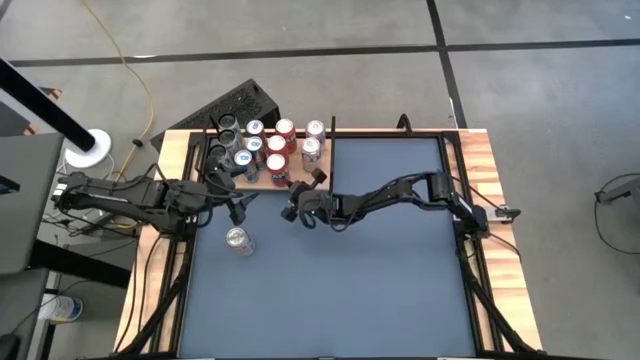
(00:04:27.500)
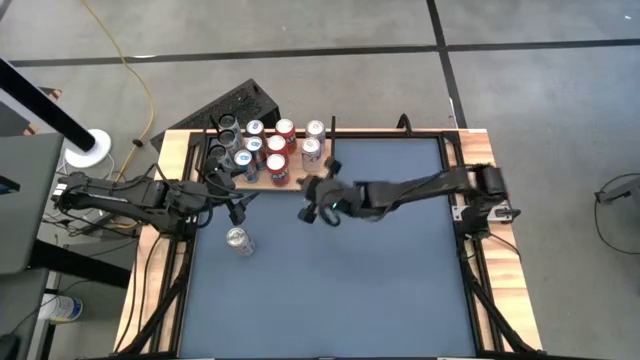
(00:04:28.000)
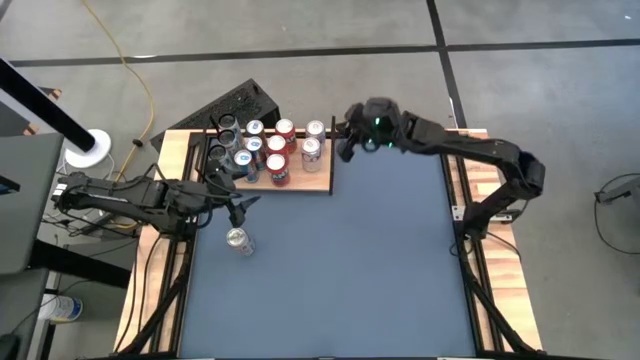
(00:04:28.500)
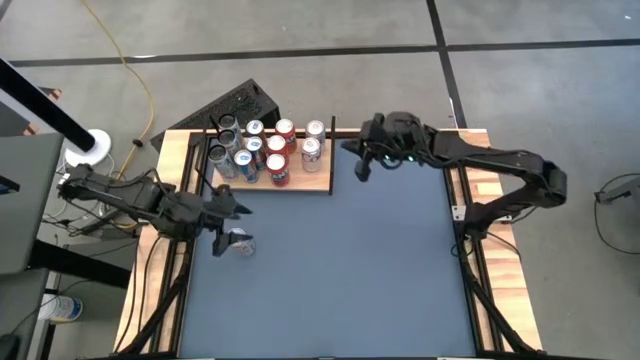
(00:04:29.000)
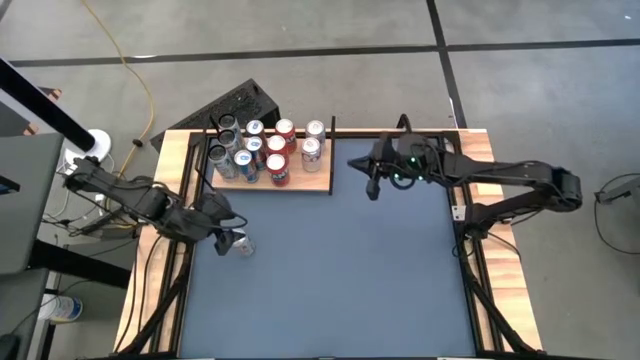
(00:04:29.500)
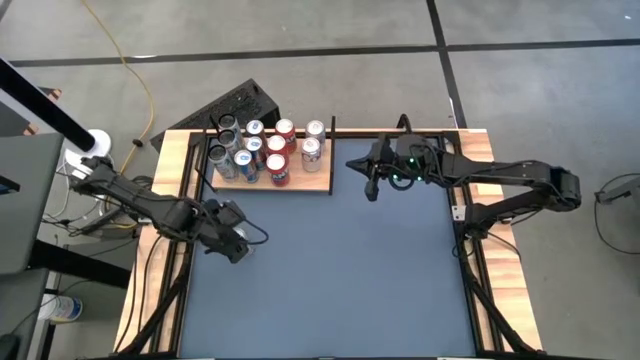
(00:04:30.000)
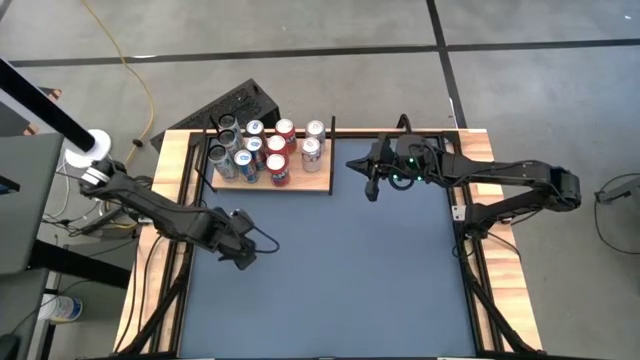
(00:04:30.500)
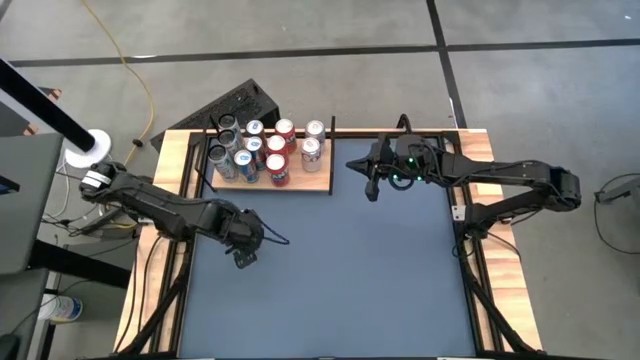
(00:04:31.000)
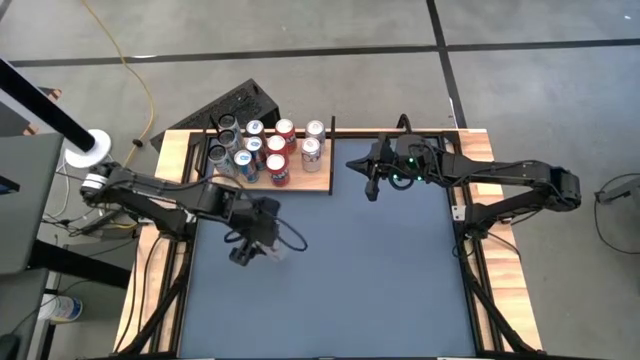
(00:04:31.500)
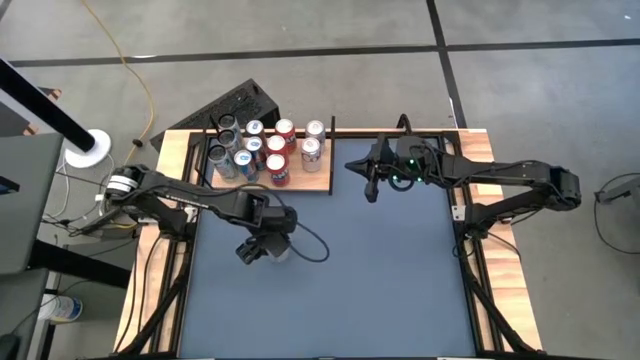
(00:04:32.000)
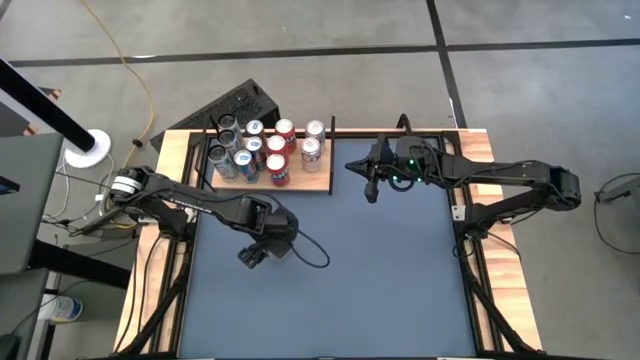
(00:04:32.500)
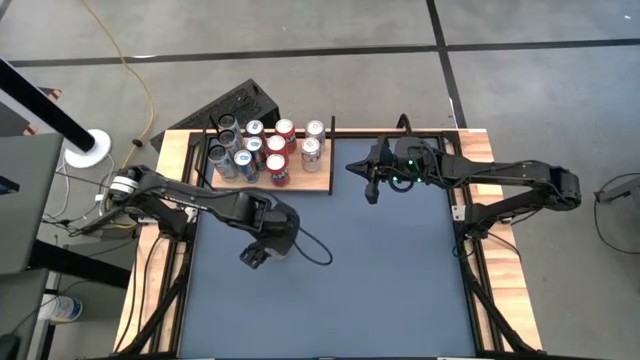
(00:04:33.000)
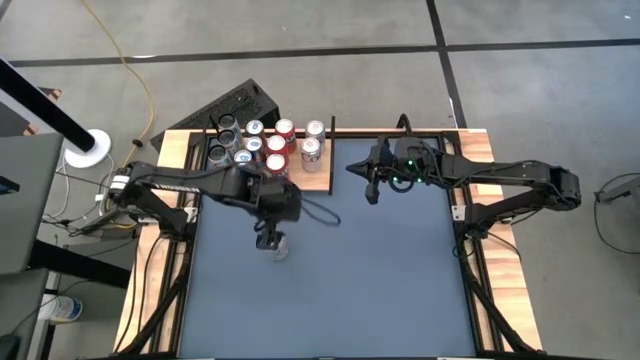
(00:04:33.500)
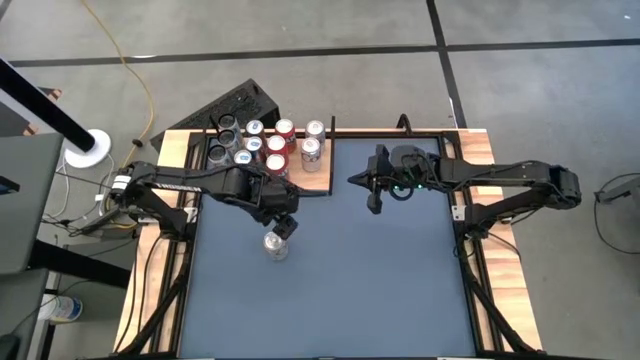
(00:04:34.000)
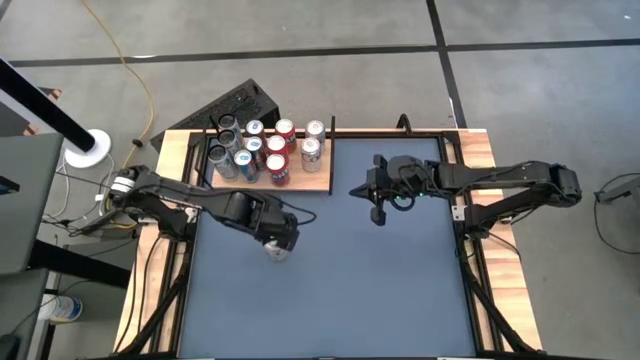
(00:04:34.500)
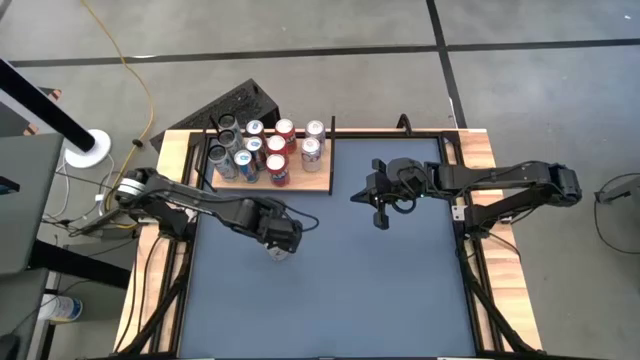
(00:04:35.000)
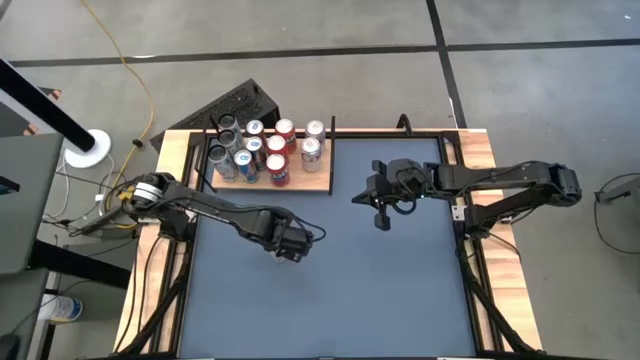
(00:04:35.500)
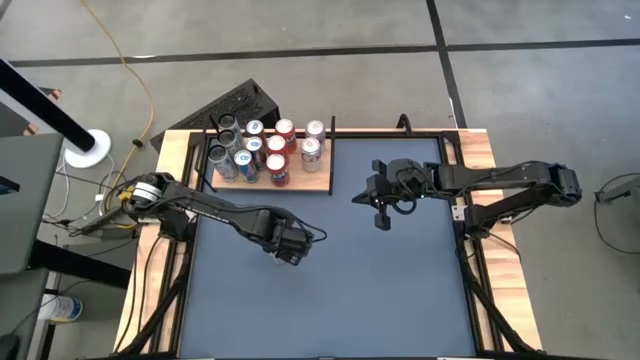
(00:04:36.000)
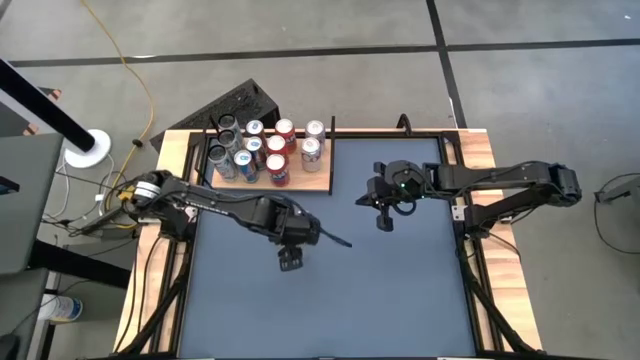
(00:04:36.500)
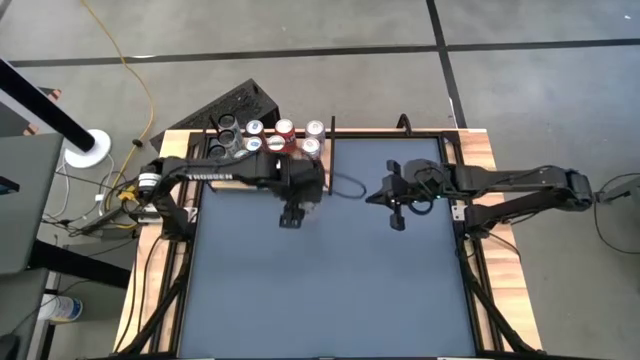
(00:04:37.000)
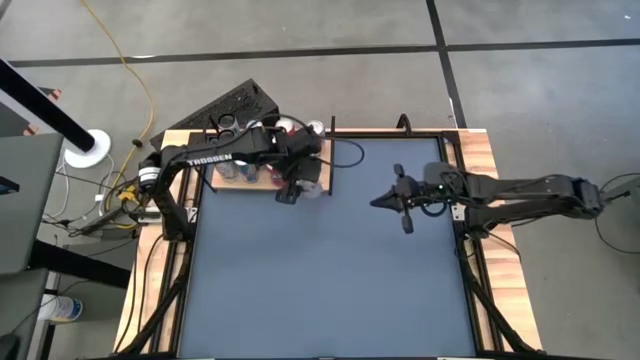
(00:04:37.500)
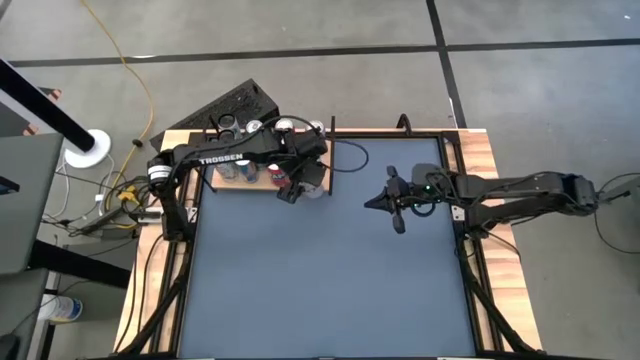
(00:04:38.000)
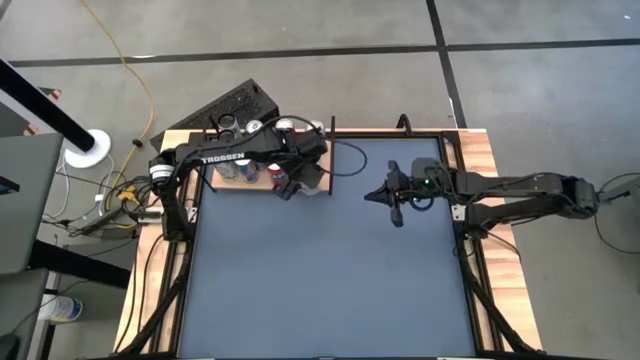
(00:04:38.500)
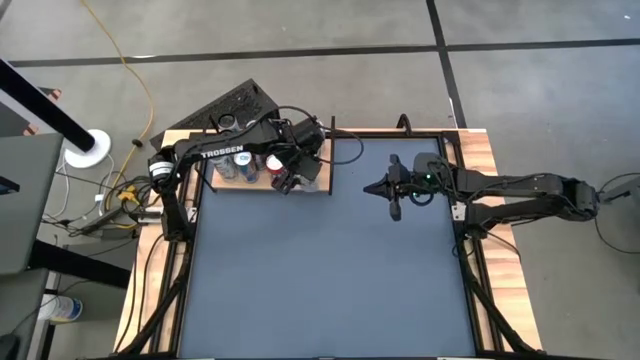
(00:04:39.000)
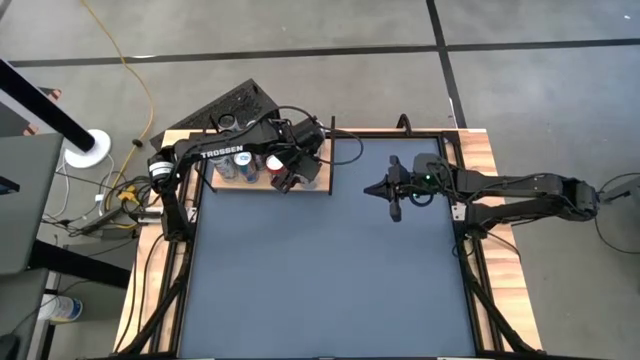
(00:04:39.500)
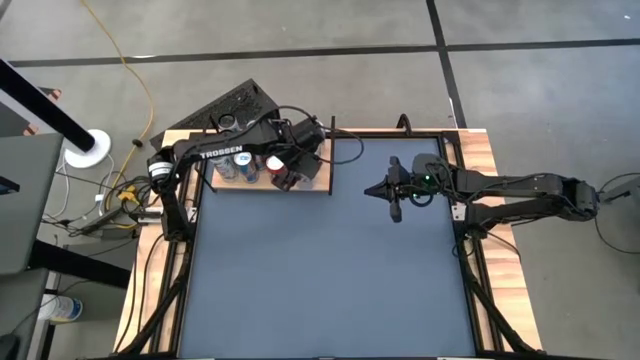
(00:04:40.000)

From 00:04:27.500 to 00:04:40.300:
Task: Place canned beverage on shelf
Put the silver soda can on the shelf aligned with the other silver soda cans

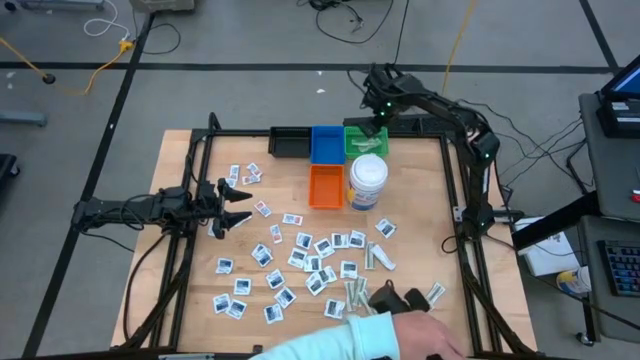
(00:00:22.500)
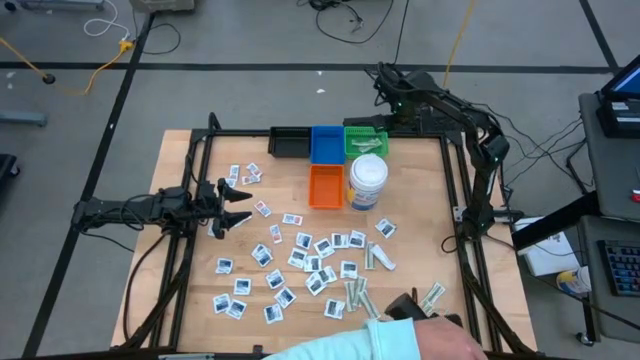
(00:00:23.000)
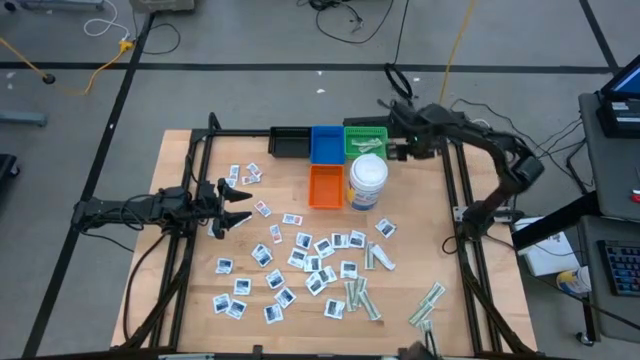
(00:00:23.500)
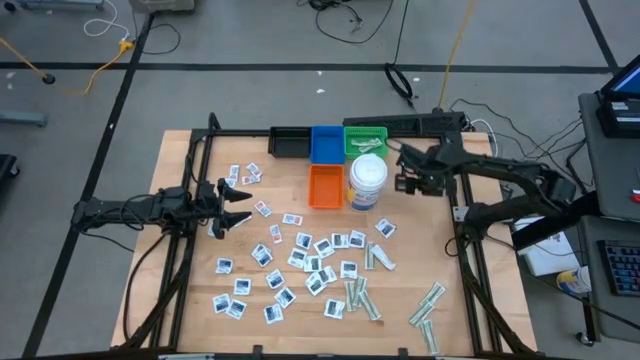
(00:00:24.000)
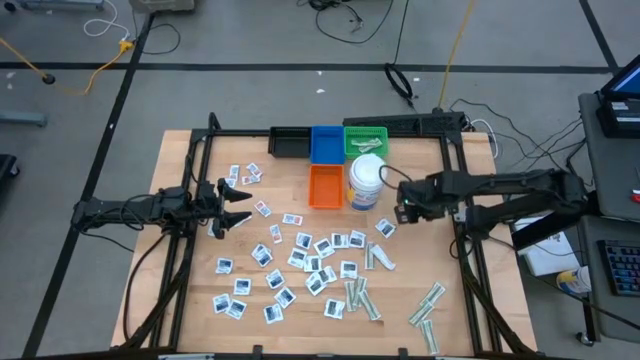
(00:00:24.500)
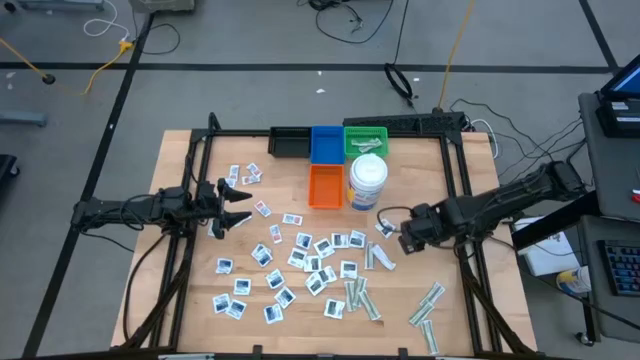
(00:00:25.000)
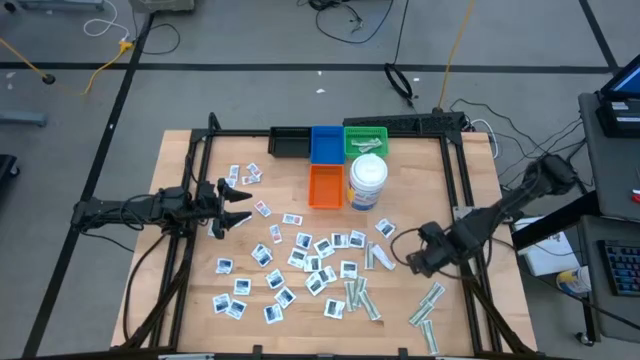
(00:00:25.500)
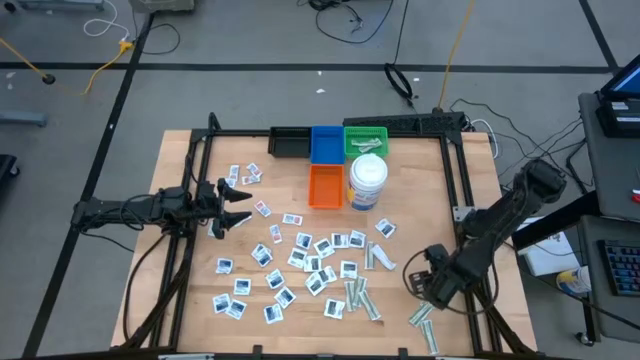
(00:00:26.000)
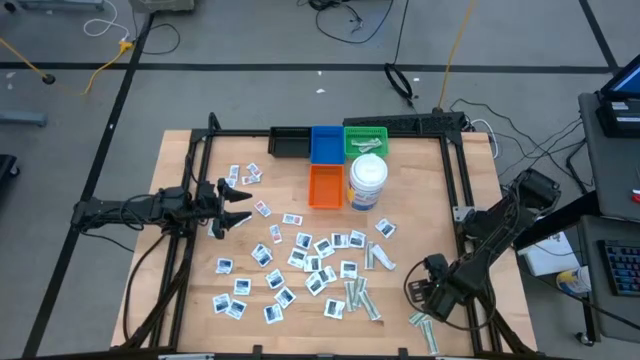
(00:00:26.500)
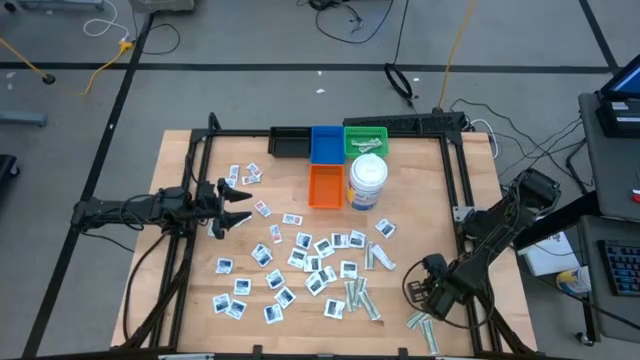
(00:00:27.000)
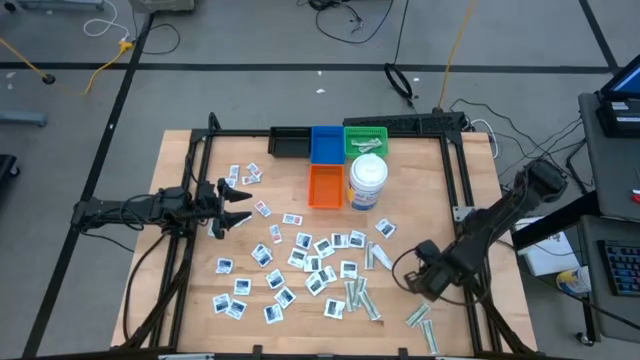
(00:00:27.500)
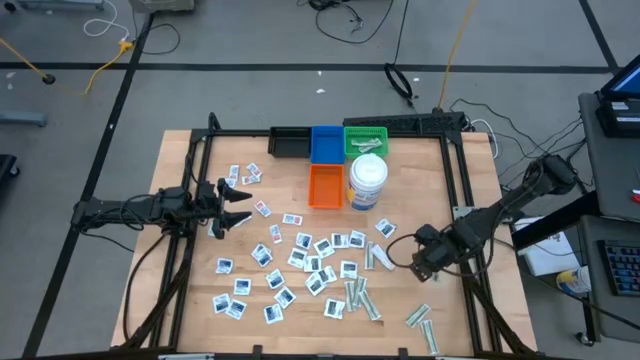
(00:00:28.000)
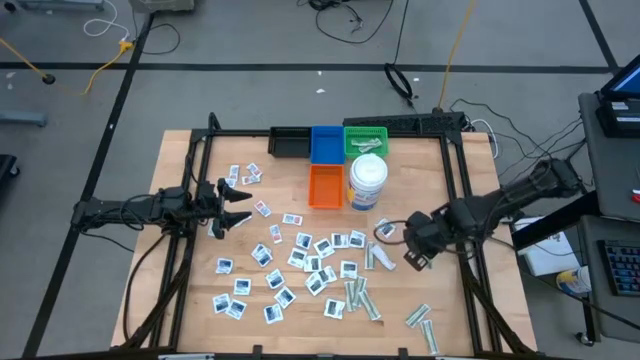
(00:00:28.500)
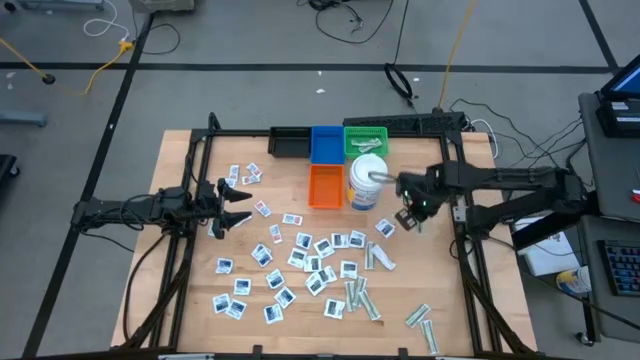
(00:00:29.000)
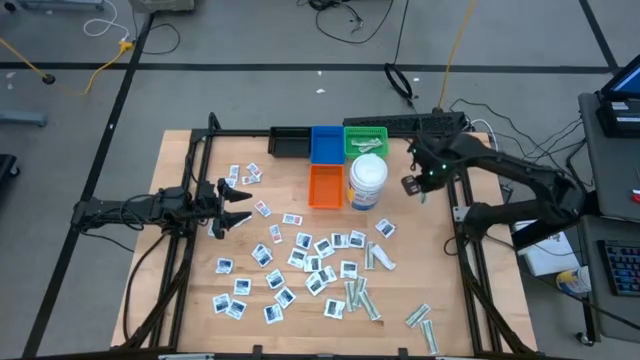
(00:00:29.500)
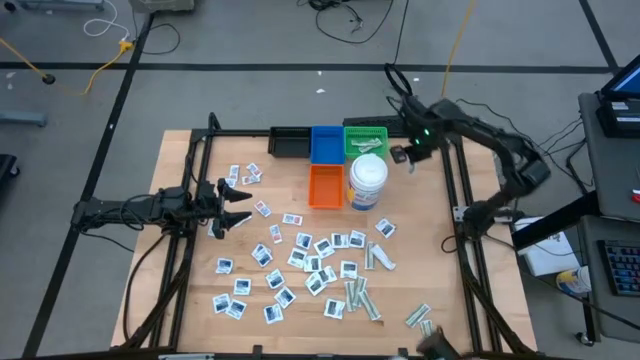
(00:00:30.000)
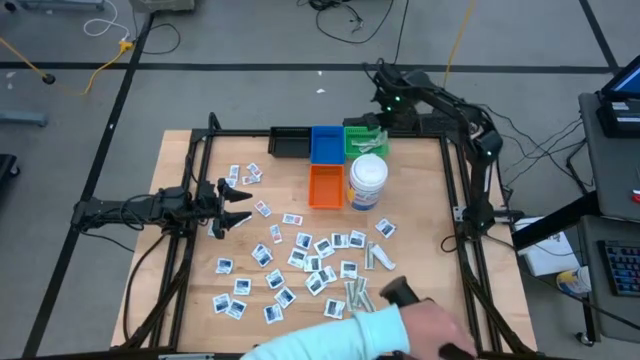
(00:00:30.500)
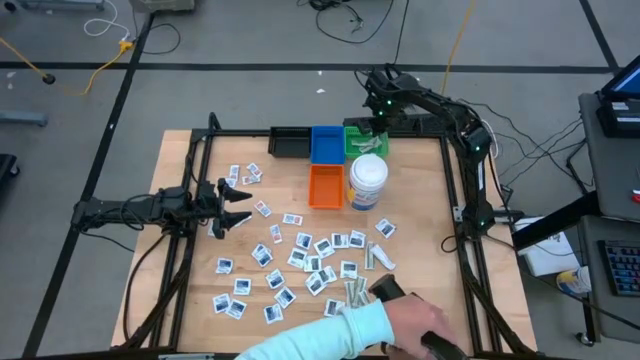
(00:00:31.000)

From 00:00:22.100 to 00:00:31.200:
Task: Pick & Place First Aid Supplies
Put the green bandage pack into the green bin
